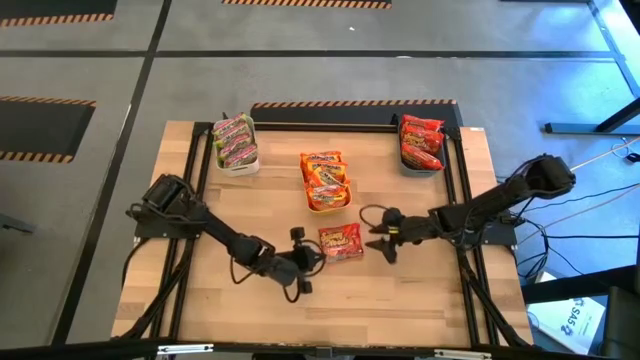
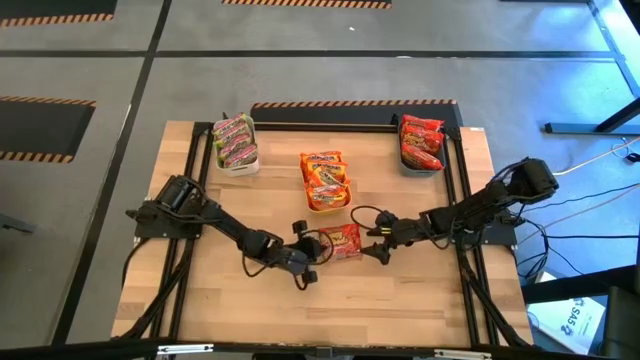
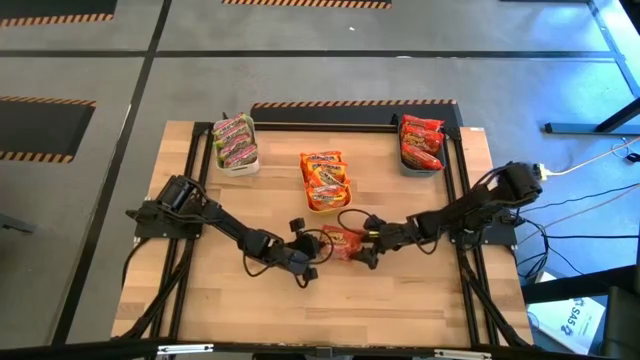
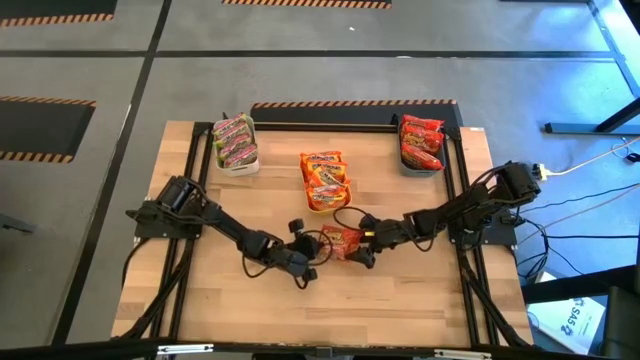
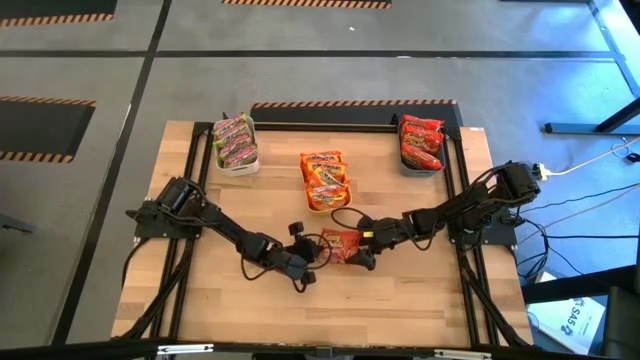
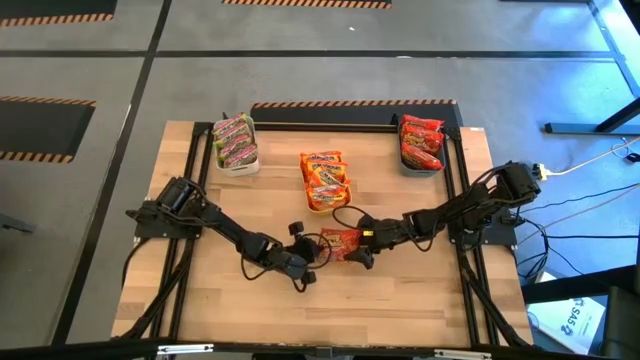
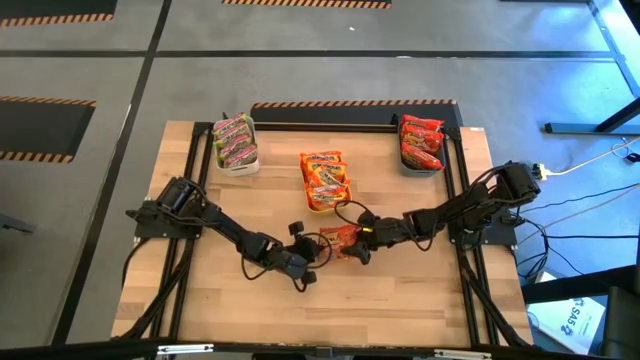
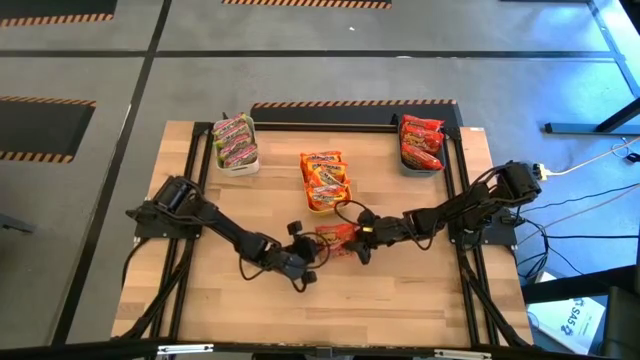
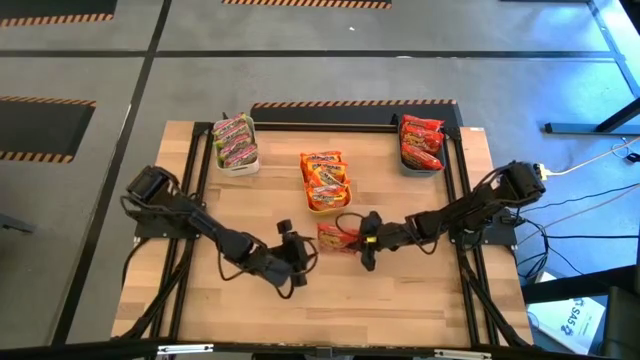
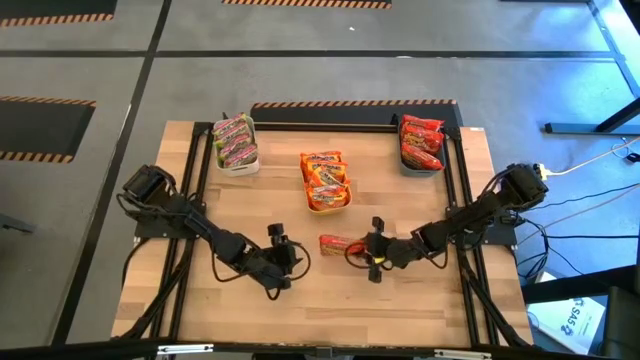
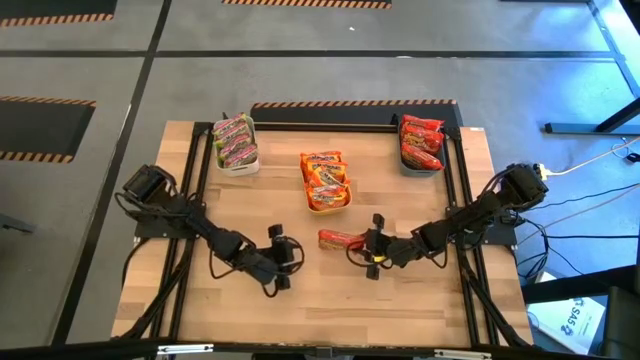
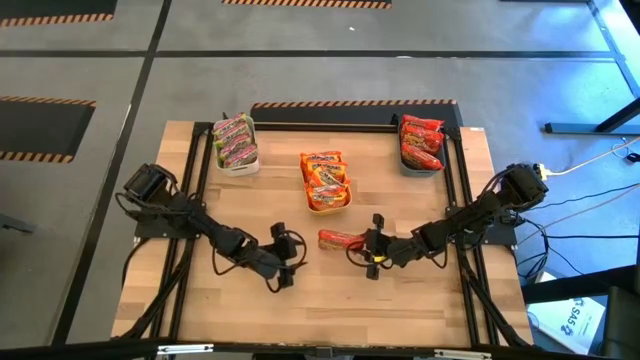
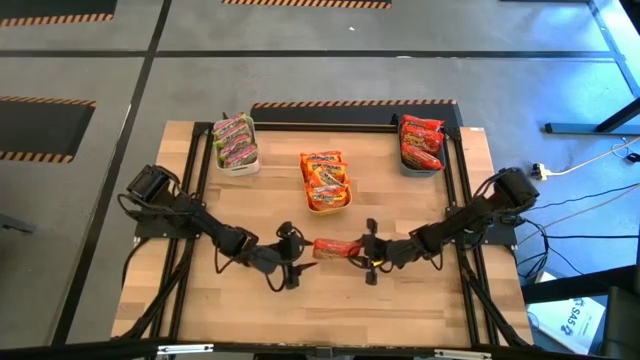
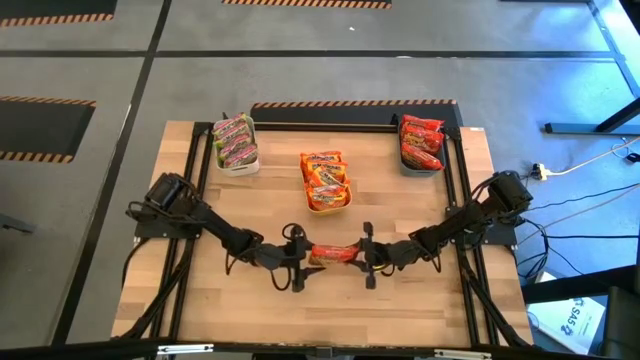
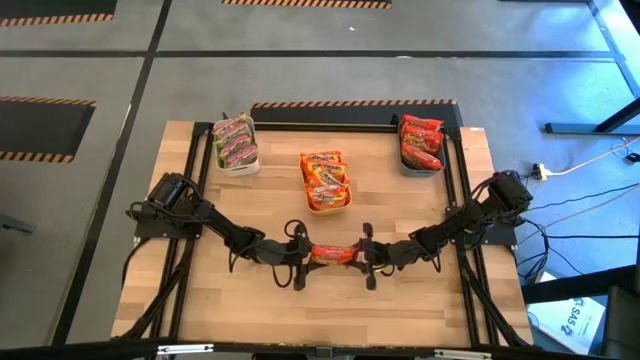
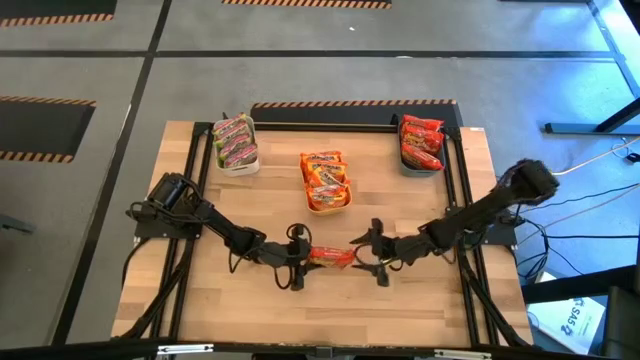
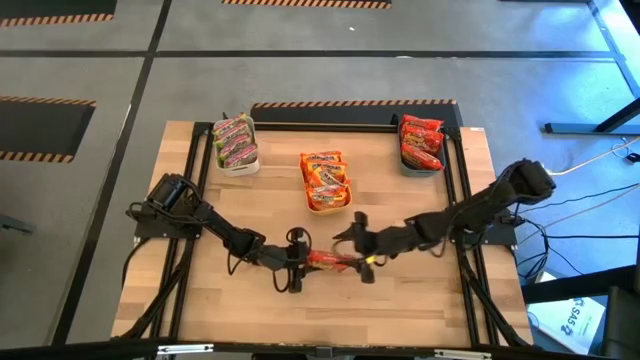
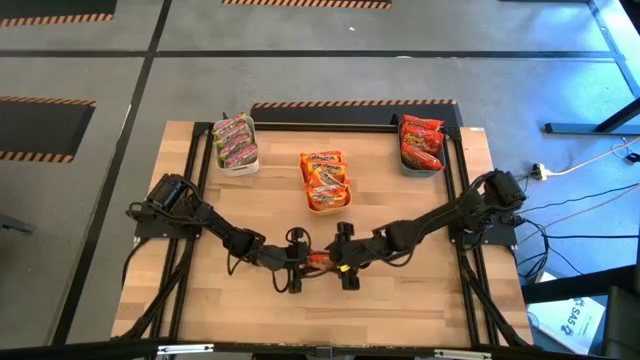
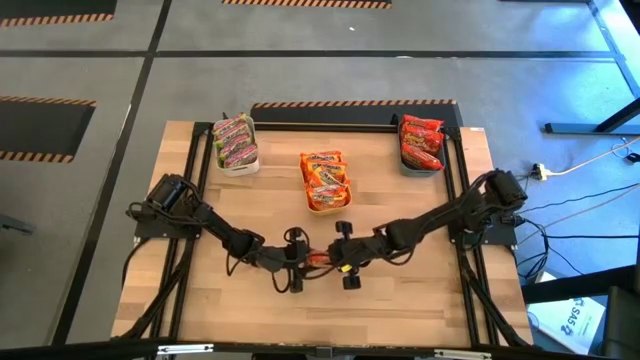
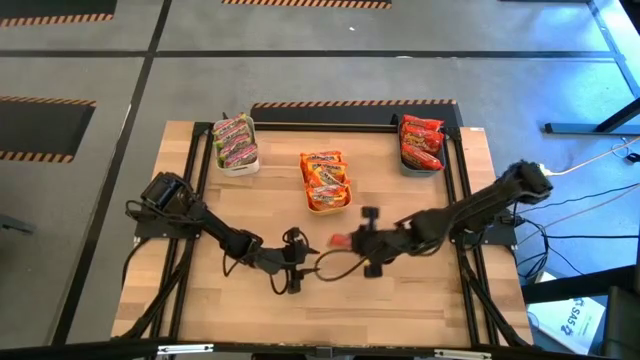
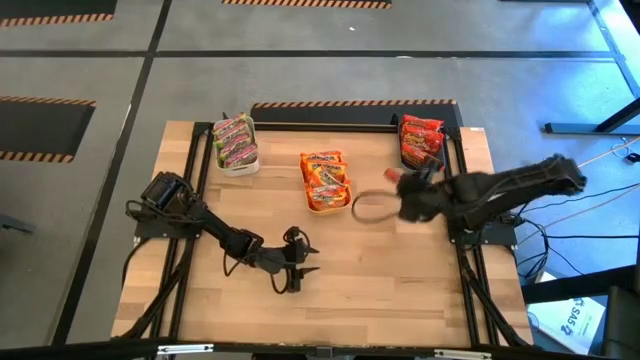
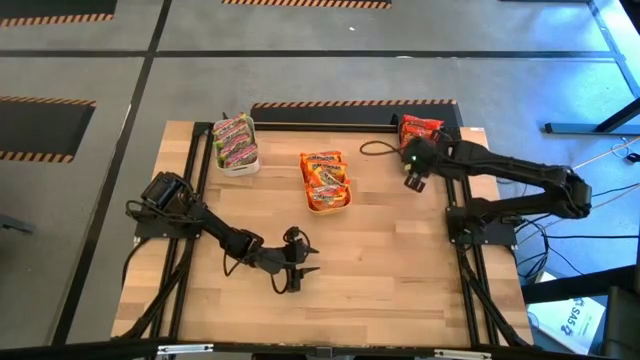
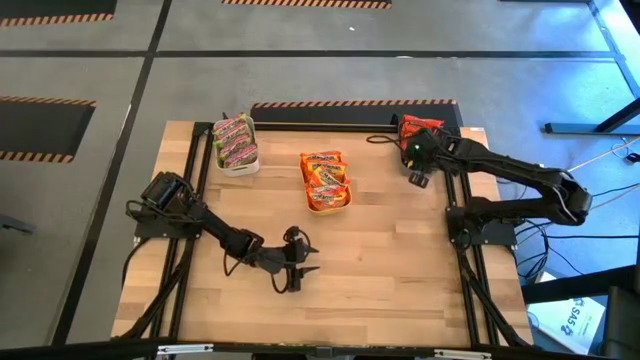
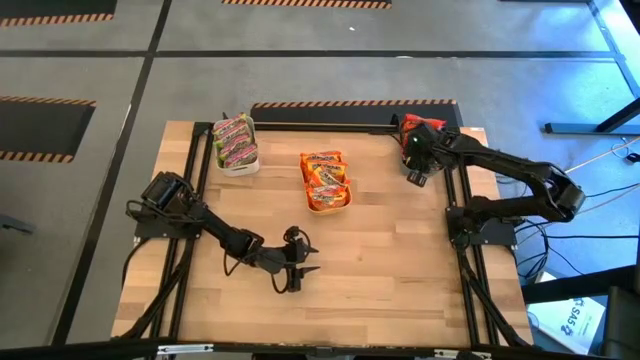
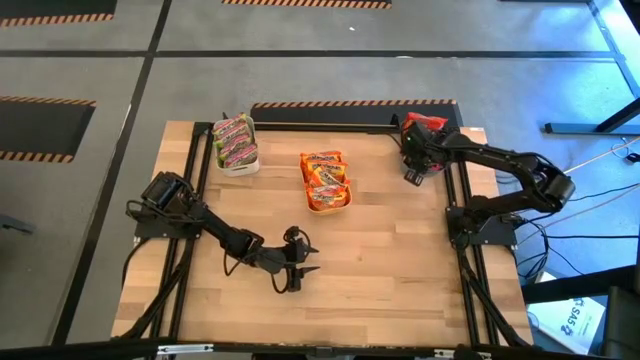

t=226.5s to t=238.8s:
Task: Sort Maruchan noodles
Put the red noodle pack into the green bin

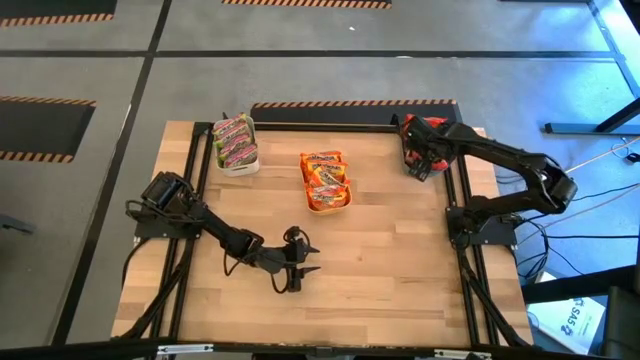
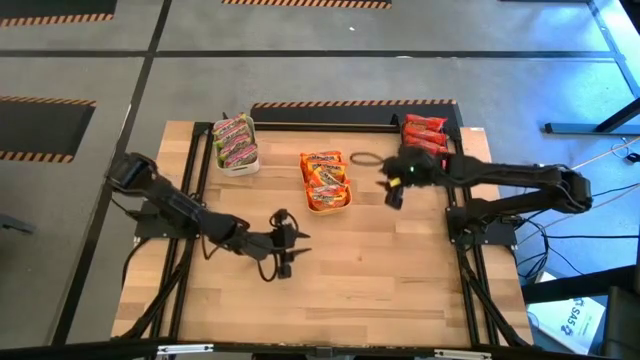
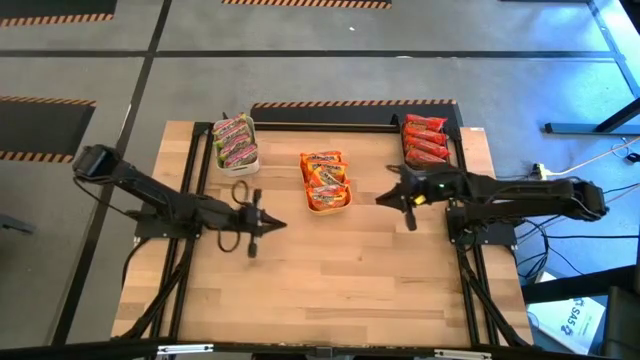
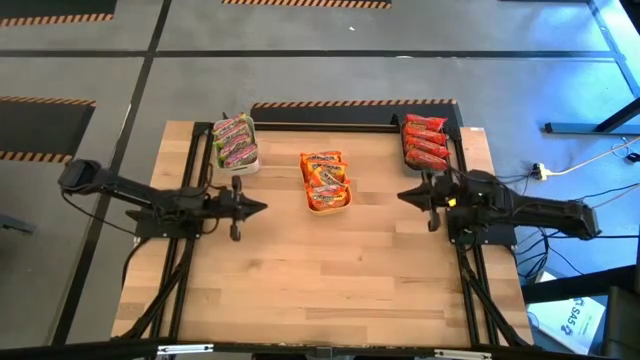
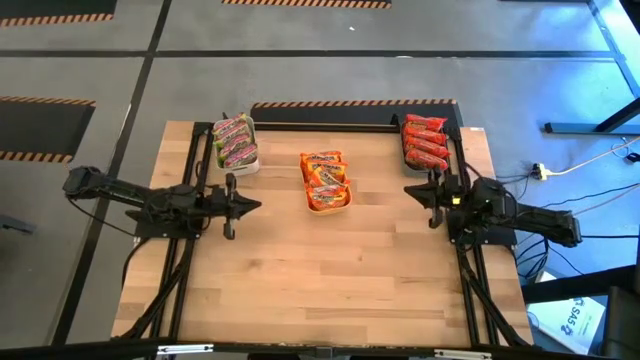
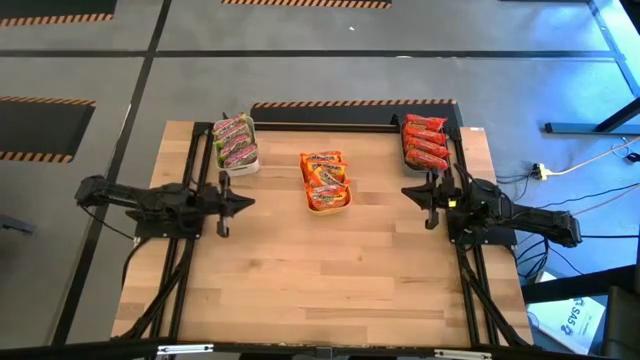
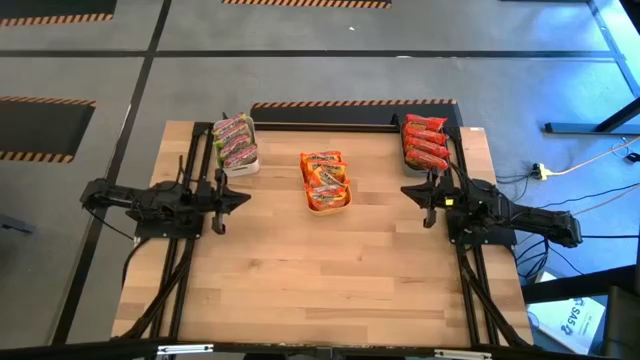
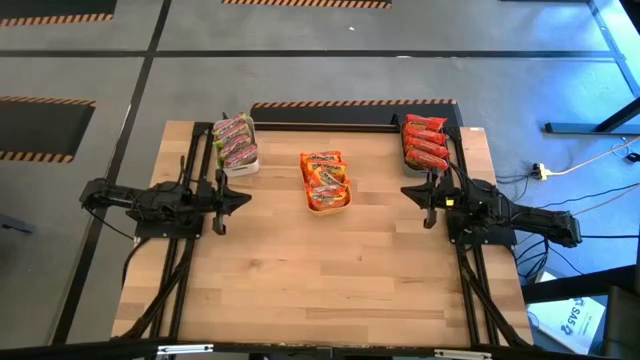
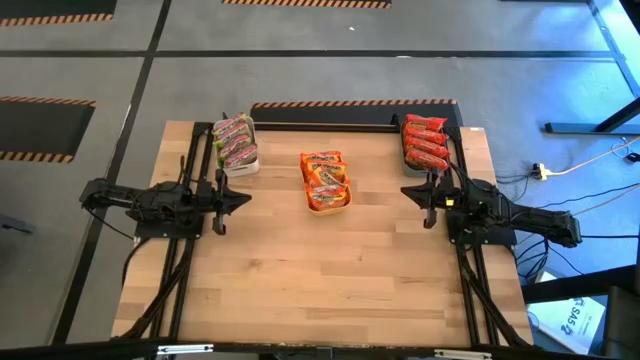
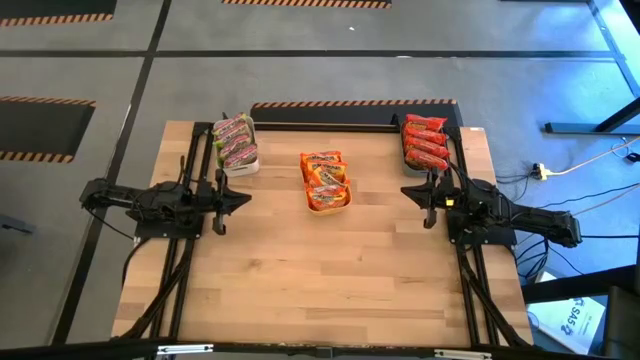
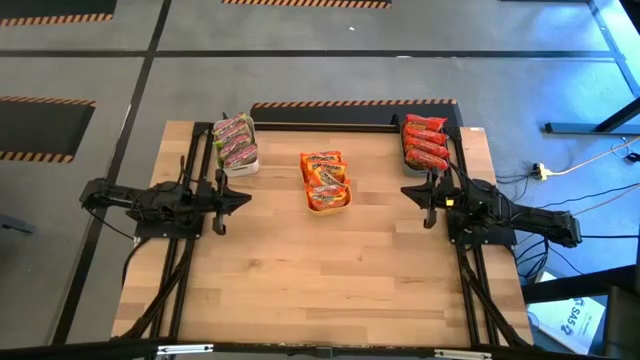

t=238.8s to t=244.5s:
Return to Home Position

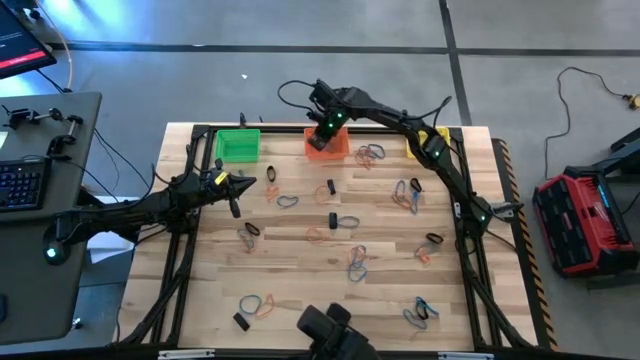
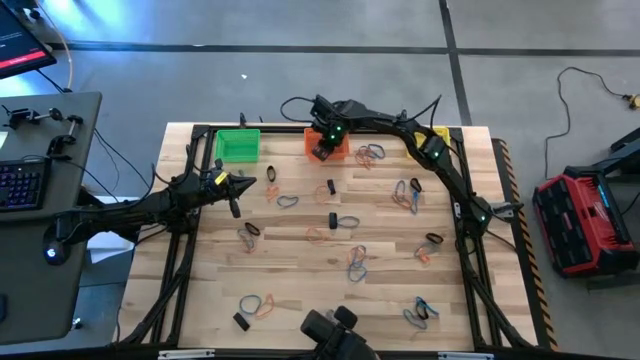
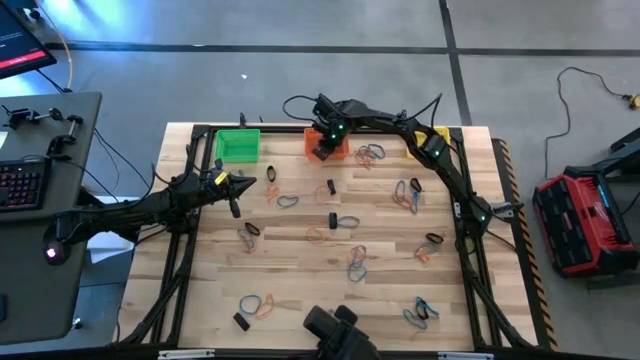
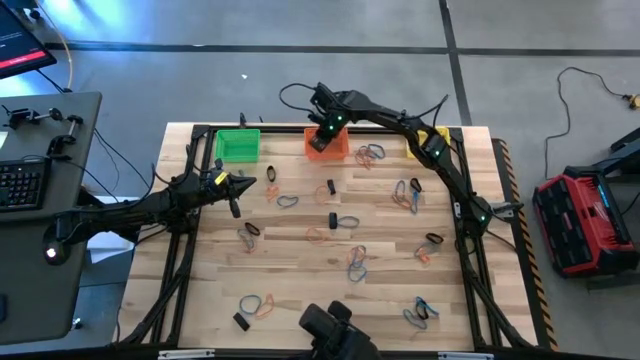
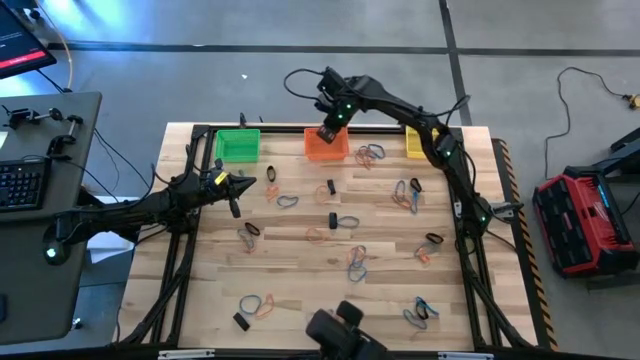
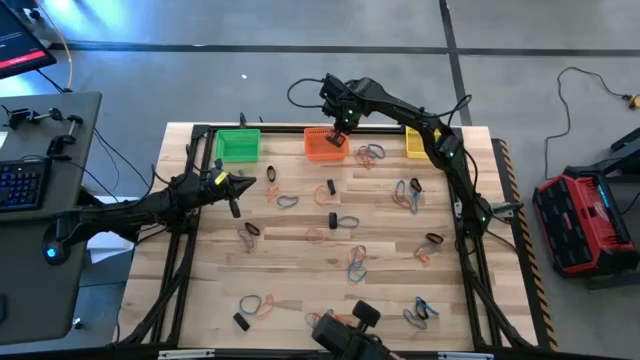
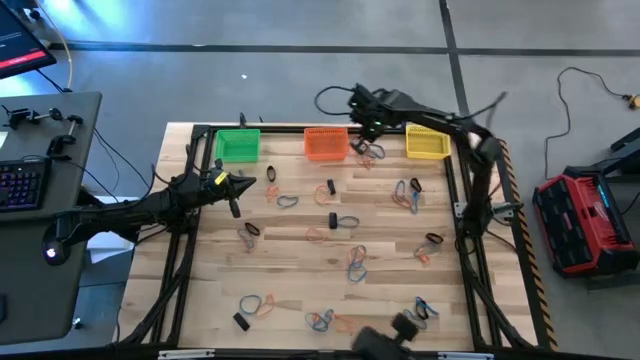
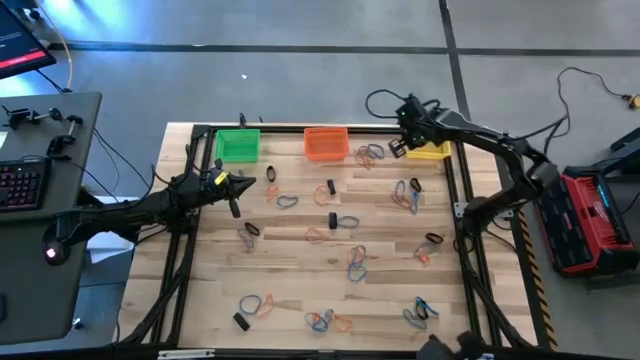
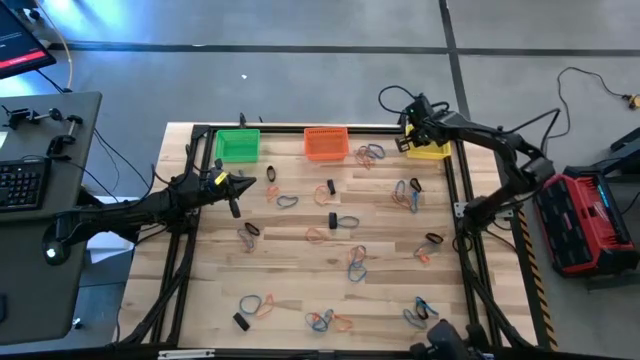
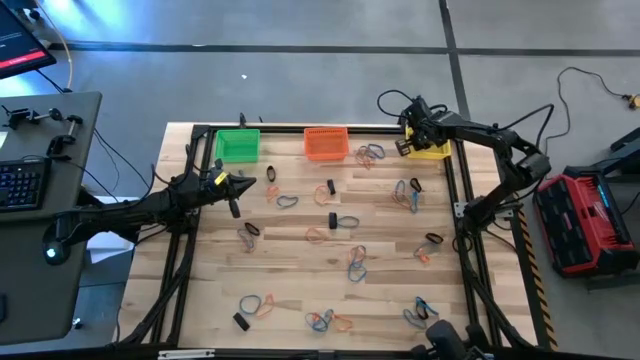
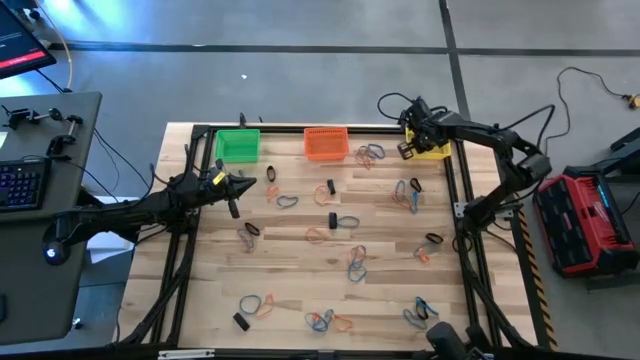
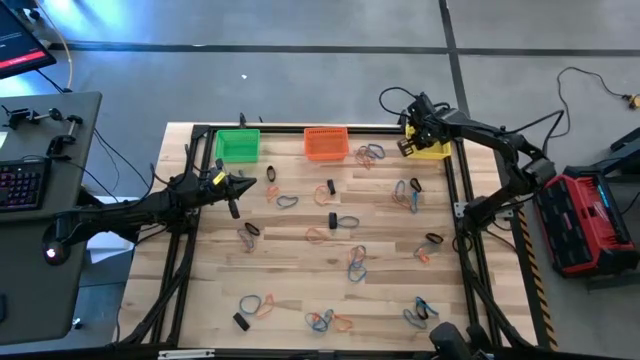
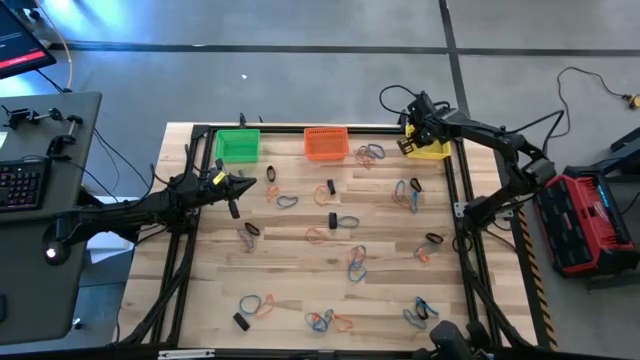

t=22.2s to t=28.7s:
Task: Sort rubber bands into baskets
Put the blue rubber band from the orange bin into the yellow bin
